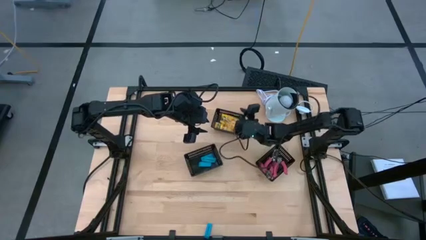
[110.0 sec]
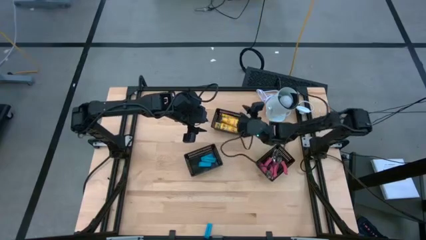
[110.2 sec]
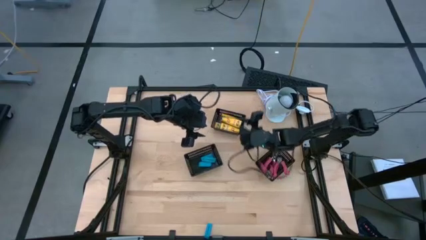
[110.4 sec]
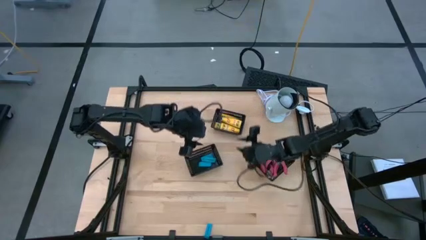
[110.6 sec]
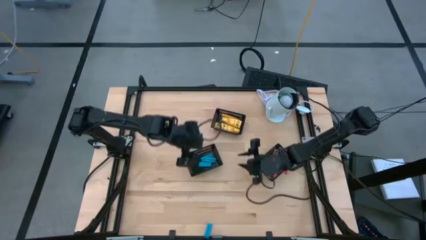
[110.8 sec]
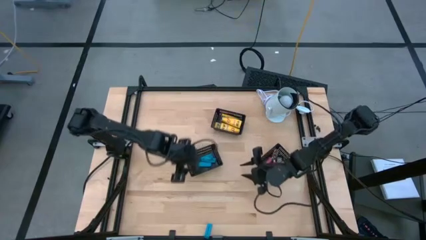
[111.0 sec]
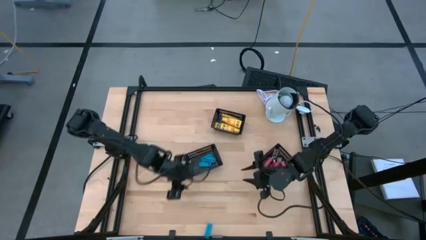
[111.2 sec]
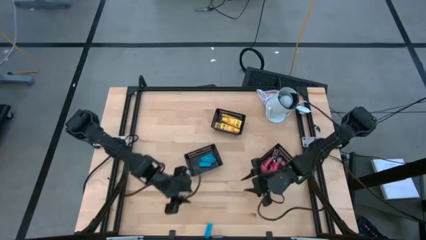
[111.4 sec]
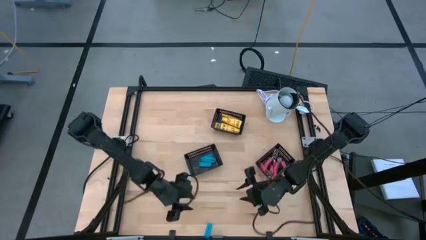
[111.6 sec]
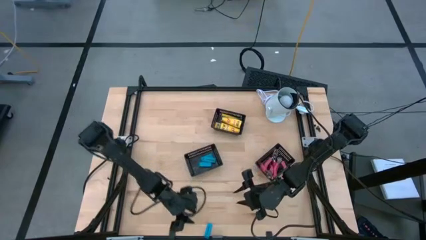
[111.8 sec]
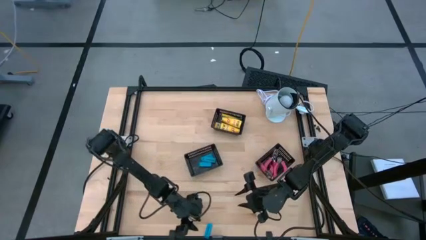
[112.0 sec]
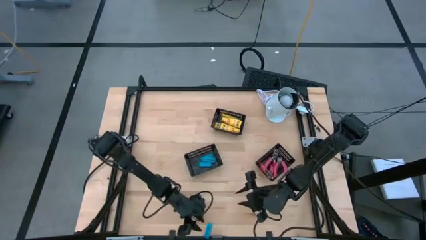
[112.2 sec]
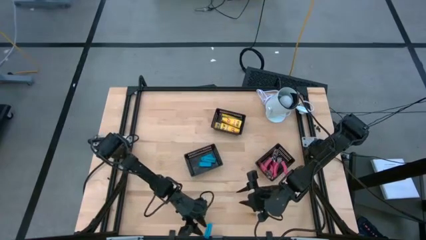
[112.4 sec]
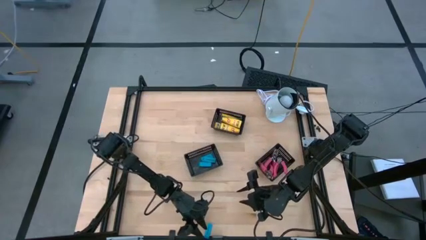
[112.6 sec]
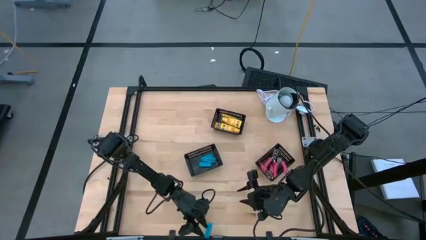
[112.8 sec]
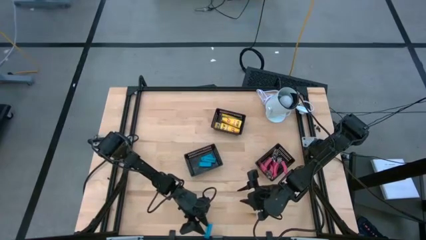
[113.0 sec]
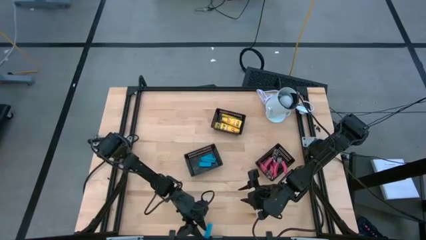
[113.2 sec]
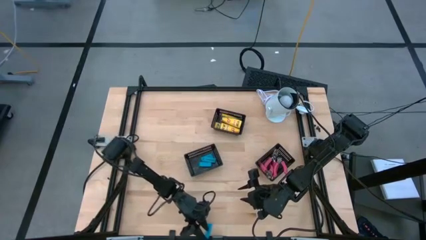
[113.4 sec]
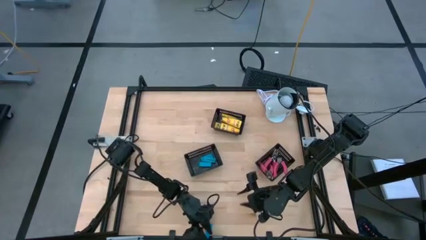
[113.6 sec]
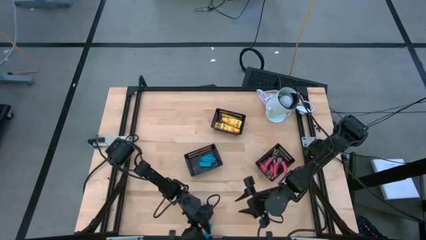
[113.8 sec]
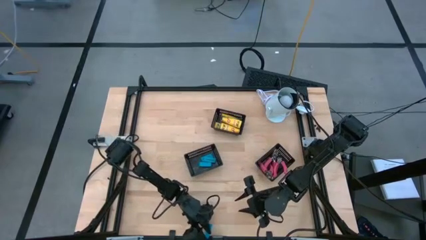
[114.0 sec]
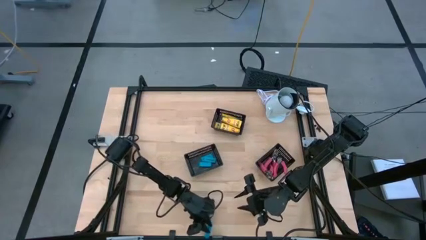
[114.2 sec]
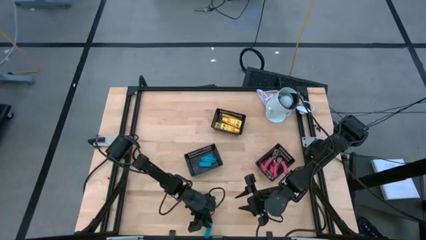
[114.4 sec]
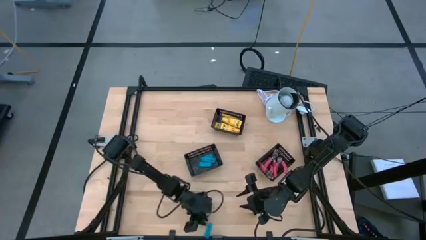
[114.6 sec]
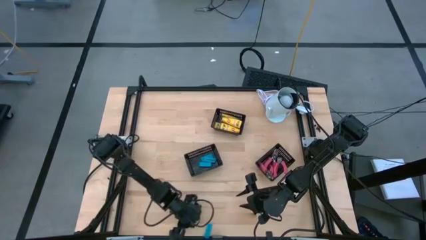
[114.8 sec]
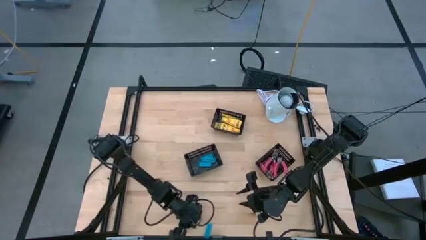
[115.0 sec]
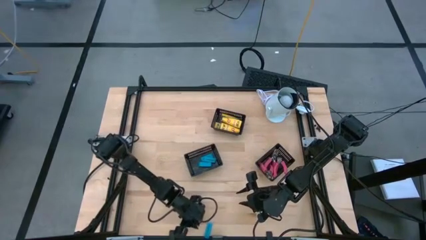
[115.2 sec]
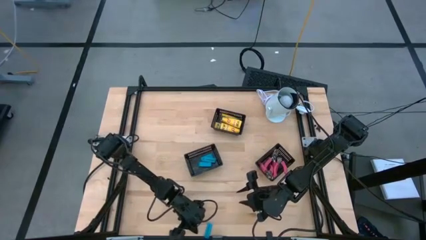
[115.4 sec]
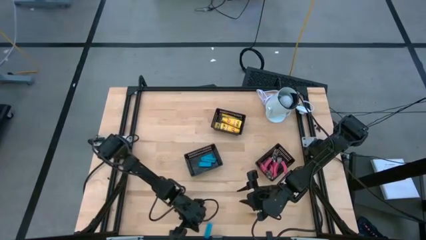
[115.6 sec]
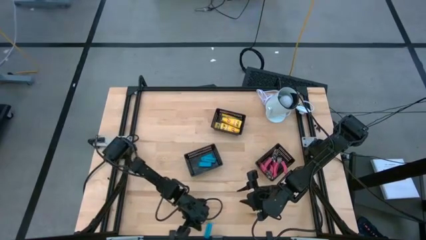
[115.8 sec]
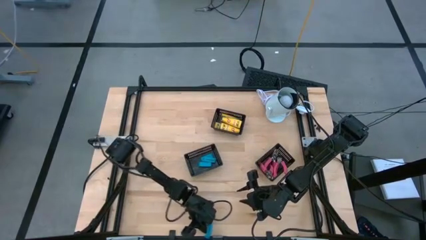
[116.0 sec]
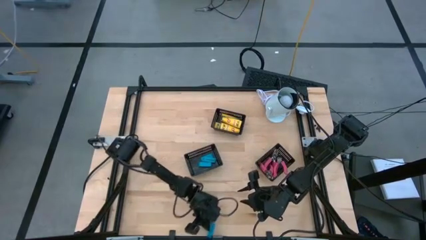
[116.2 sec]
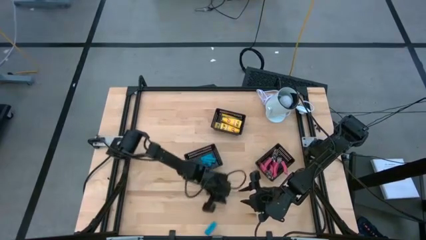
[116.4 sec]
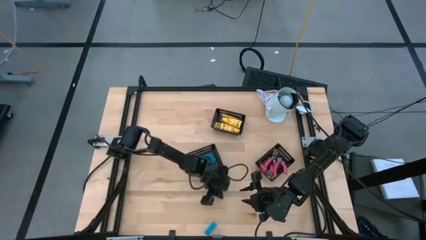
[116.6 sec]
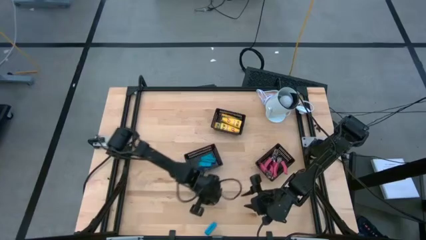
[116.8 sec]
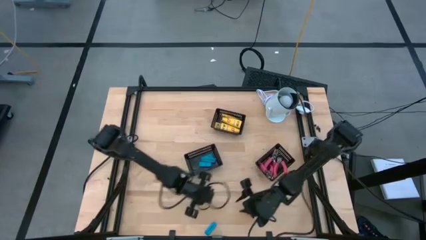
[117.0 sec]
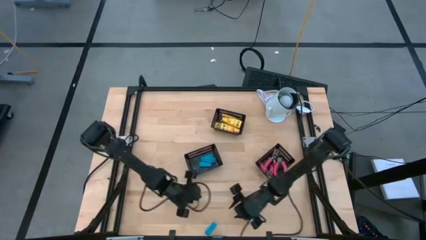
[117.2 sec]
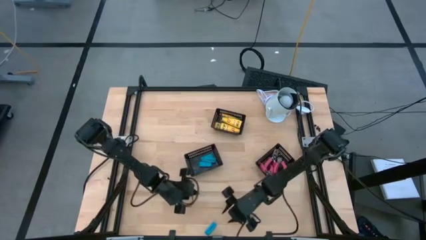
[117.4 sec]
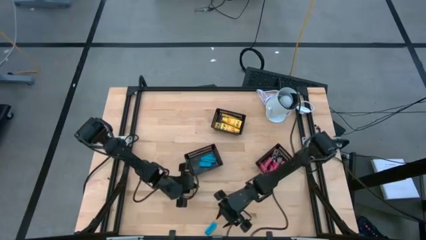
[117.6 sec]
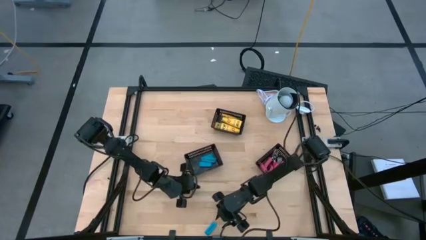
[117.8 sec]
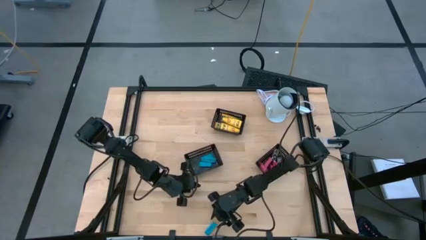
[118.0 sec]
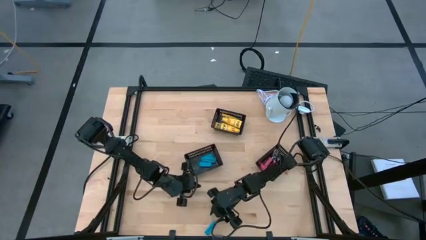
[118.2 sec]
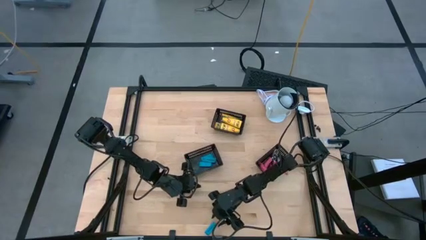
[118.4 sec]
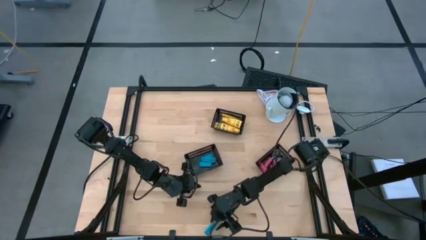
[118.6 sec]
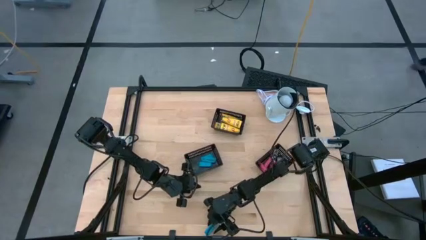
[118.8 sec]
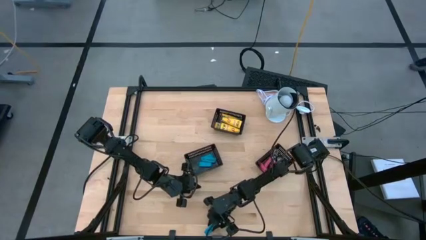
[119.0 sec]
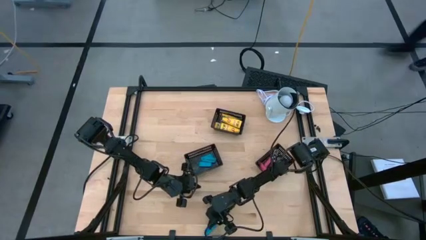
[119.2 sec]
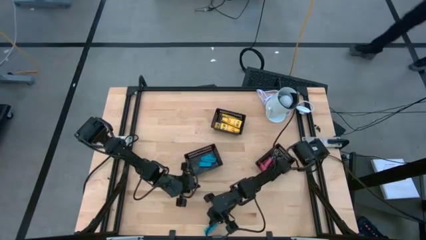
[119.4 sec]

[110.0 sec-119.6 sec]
Task: Pick & Place School Supplies
Put the blue eraser into the bottom left black bin

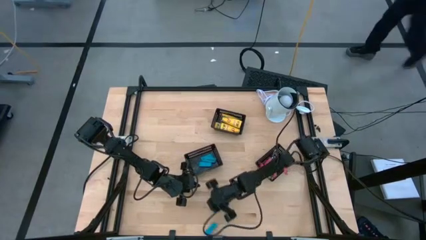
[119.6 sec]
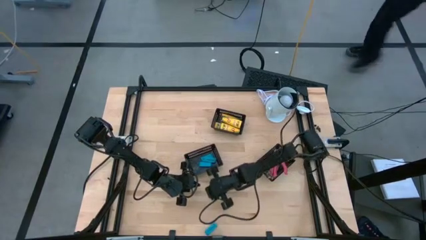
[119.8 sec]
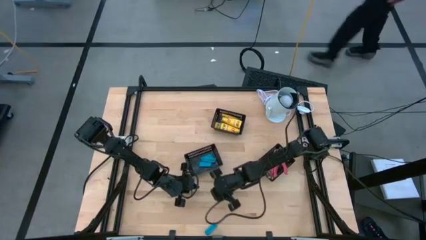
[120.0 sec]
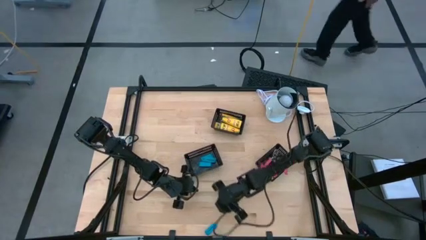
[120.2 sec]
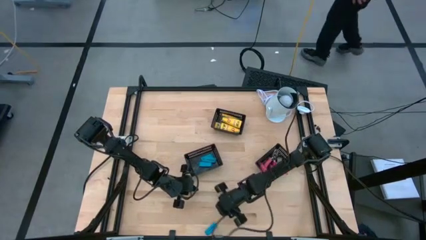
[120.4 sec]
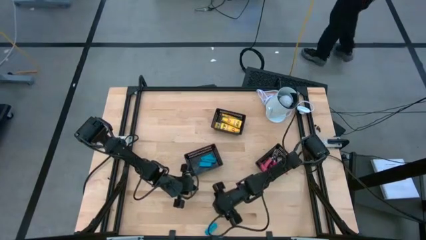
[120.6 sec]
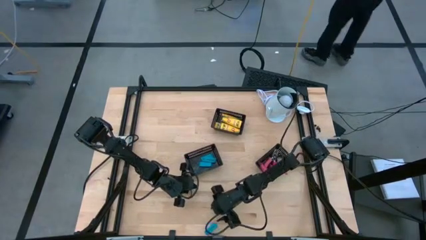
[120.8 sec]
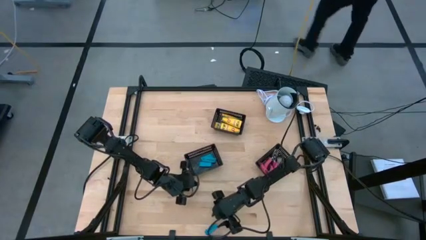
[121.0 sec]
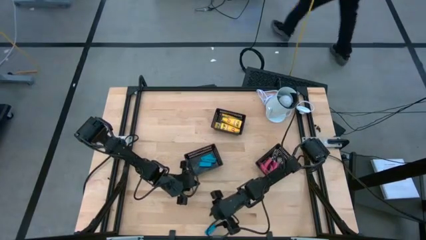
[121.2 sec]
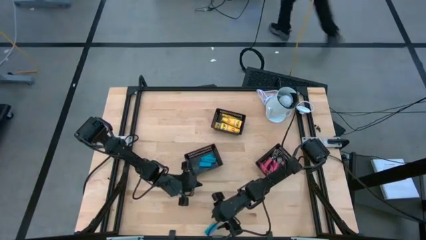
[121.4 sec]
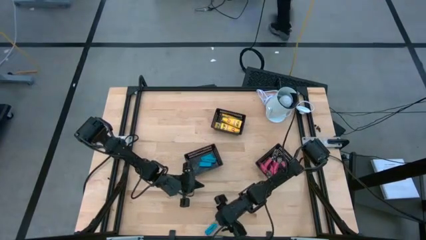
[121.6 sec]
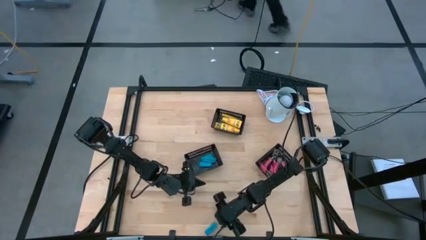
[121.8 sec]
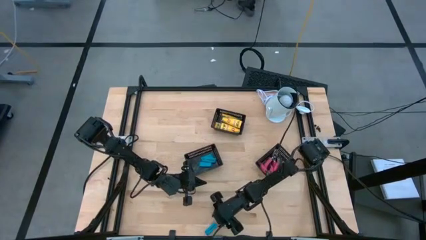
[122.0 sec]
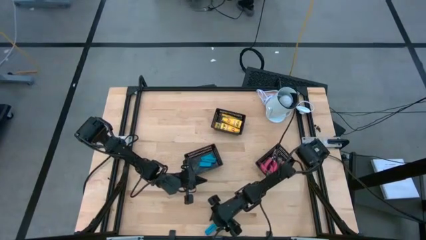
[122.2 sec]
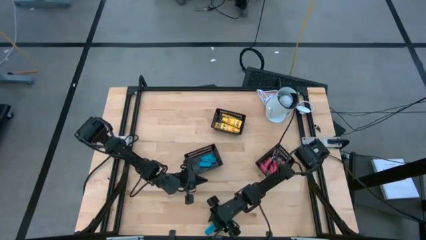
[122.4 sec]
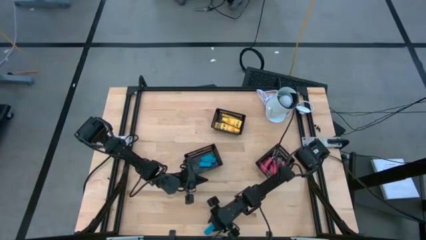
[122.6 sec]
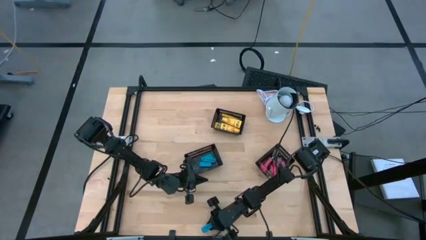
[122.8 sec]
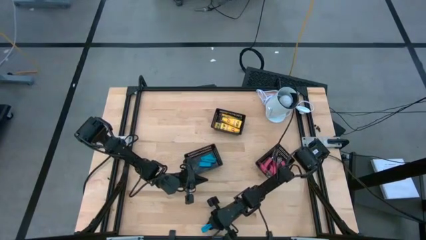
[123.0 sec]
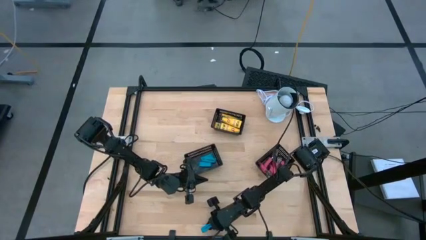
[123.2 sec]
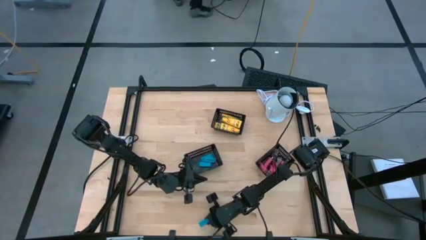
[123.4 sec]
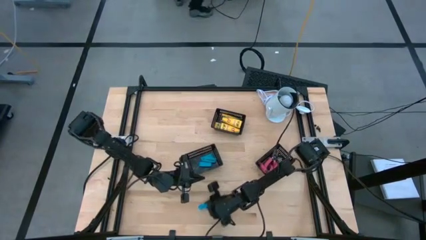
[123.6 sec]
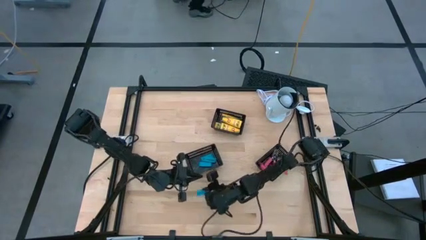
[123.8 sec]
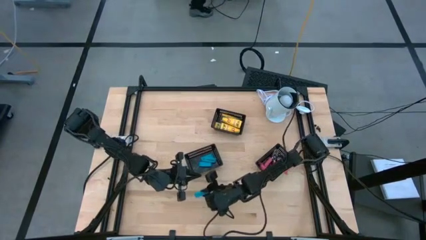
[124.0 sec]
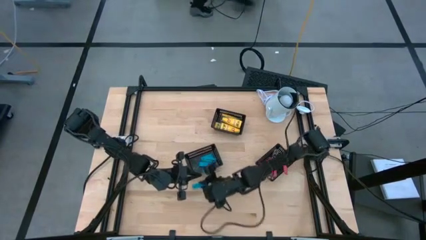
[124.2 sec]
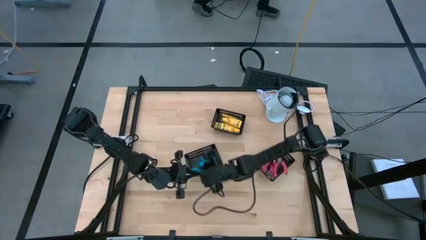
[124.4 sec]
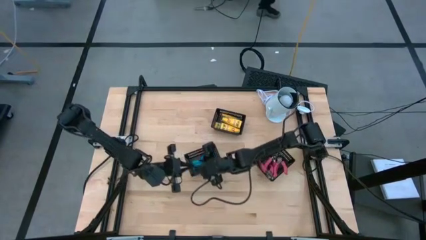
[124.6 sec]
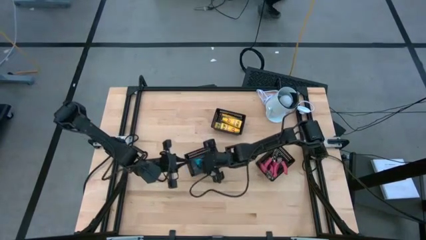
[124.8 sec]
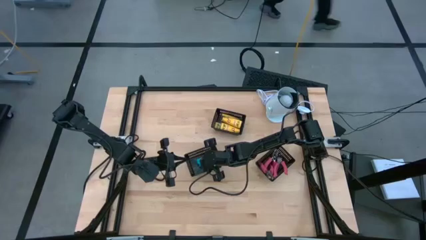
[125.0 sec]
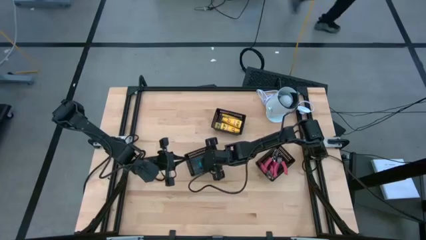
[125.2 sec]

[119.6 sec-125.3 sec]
Put the blue eraser into the bottom left black bin

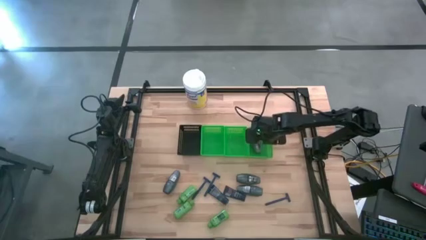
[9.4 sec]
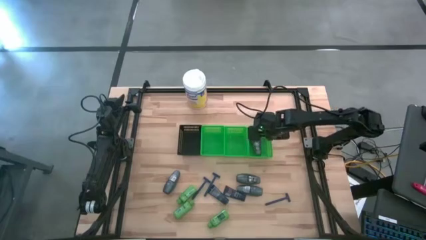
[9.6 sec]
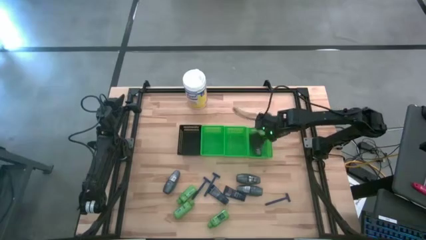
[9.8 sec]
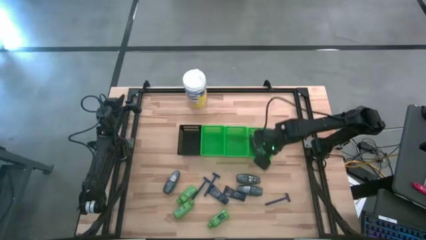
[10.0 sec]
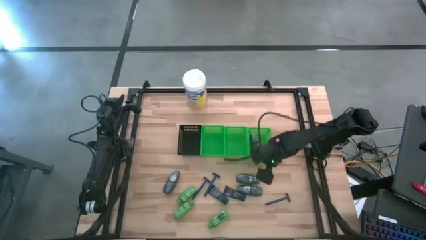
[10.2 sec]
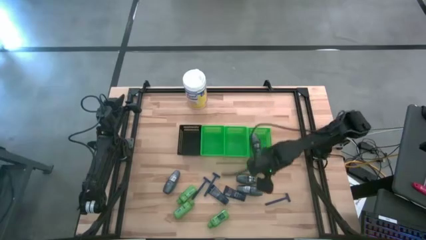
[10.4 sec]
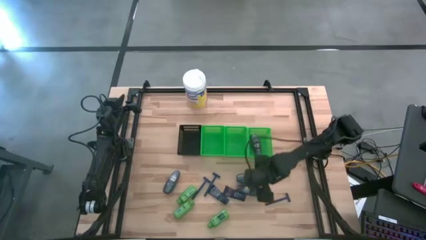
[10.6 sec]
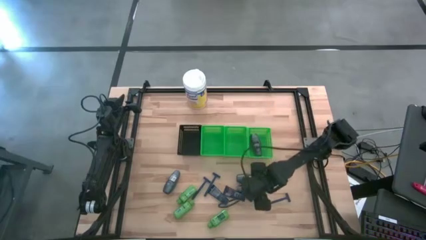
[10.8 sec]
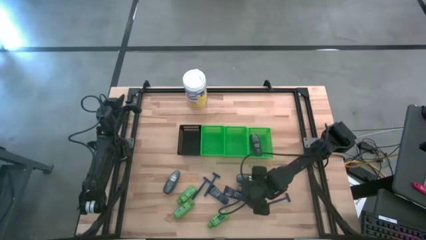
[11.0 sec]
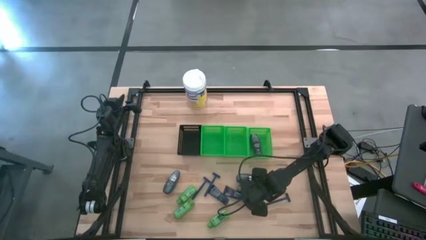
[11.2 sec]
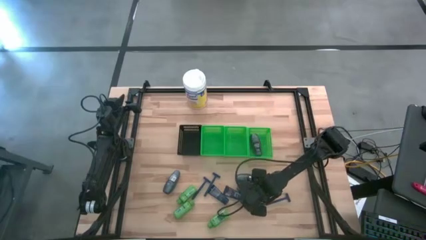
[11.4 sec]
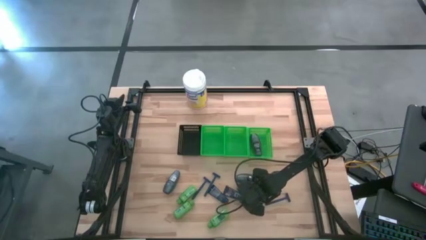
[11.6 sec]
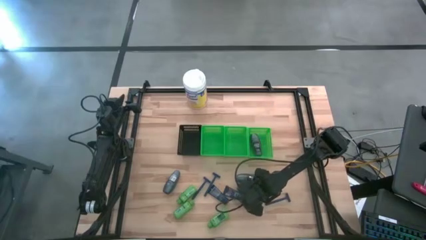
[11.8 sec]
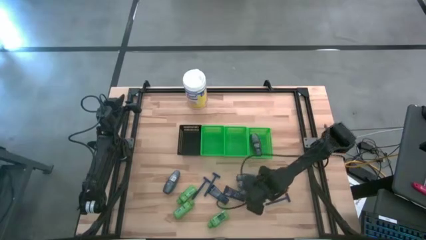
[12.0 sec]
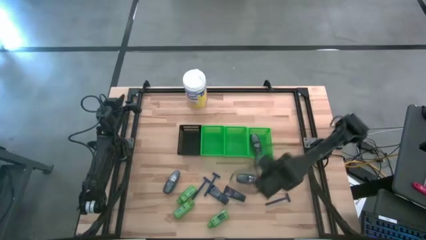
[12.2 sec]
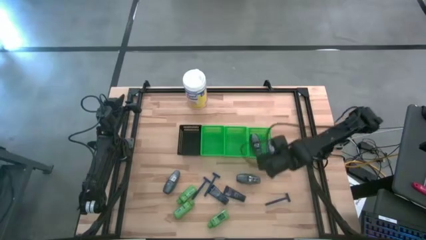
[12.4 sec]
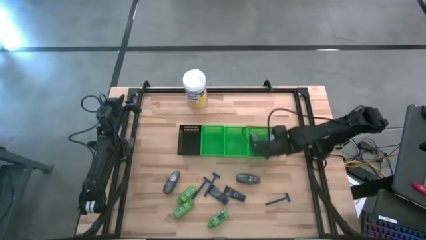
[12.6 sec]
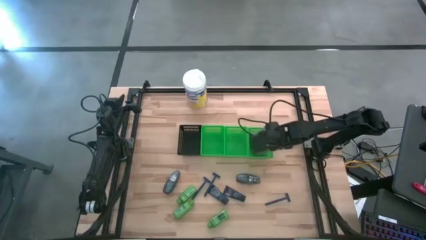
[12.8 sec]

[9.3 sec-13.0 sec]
Task: Pick & Place Travel size toiletries
Put the deodorant into the right green bin
